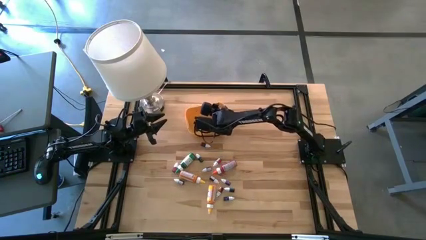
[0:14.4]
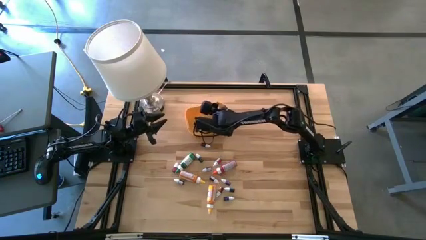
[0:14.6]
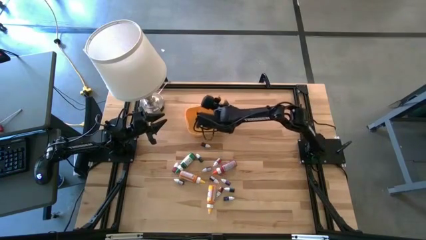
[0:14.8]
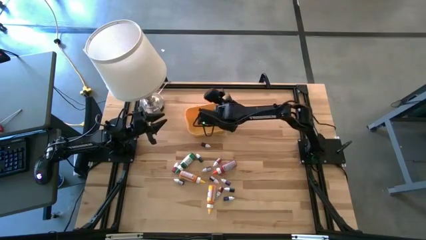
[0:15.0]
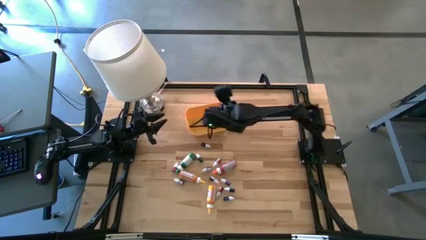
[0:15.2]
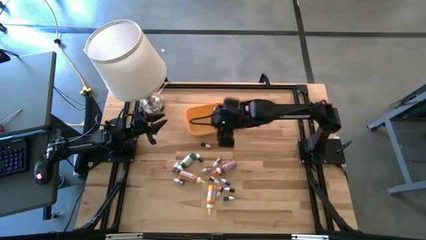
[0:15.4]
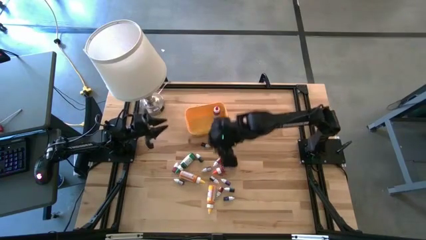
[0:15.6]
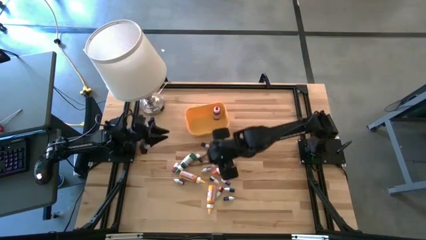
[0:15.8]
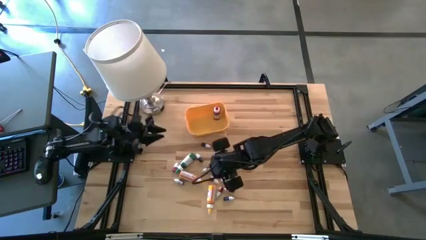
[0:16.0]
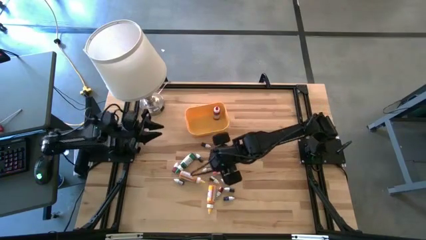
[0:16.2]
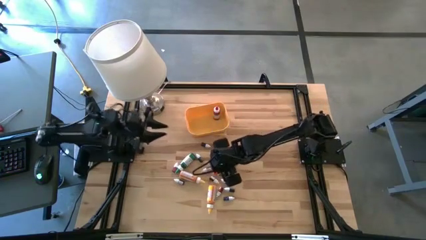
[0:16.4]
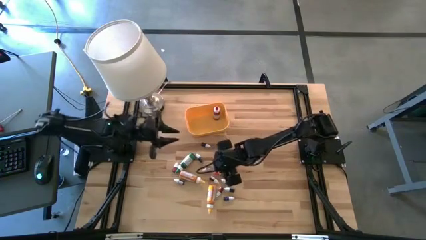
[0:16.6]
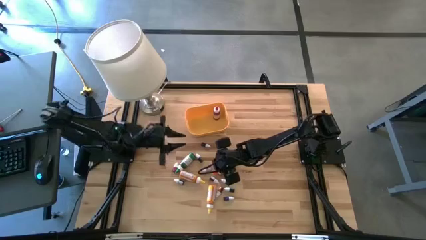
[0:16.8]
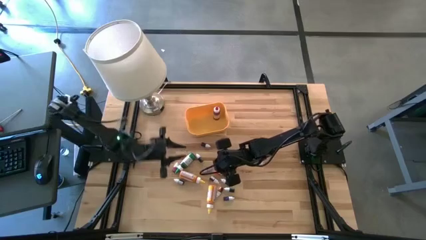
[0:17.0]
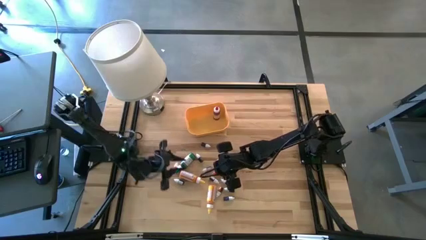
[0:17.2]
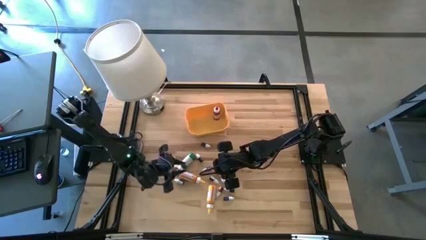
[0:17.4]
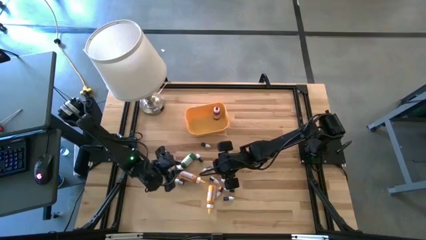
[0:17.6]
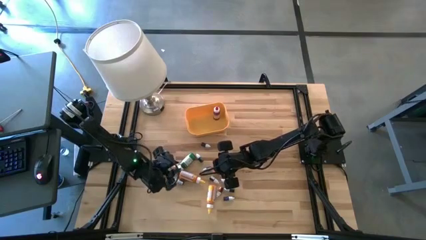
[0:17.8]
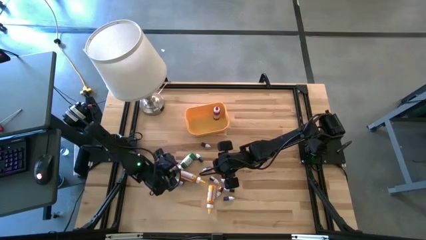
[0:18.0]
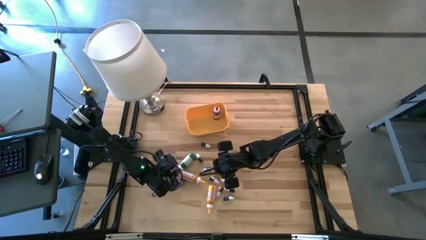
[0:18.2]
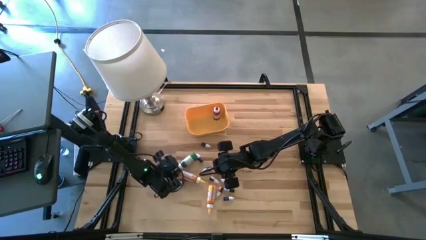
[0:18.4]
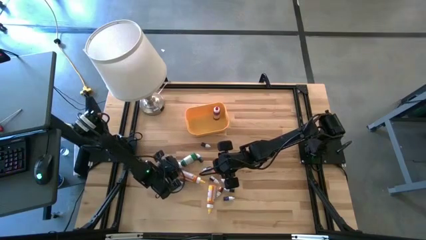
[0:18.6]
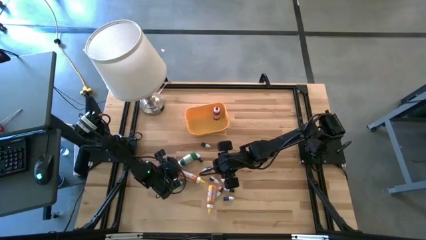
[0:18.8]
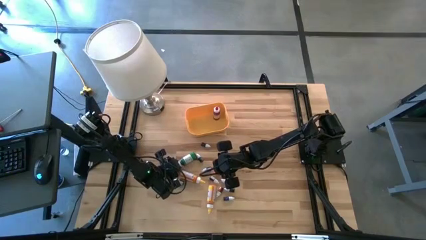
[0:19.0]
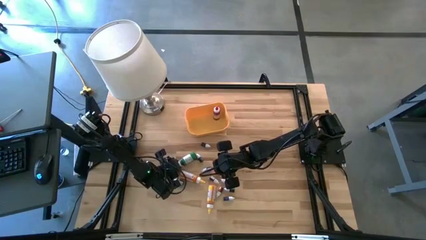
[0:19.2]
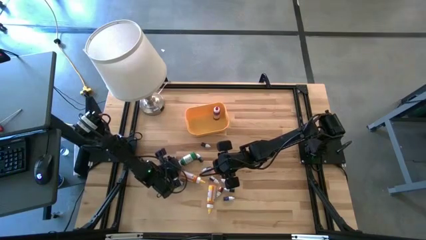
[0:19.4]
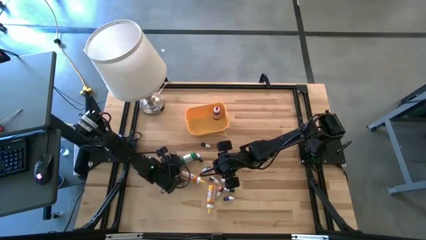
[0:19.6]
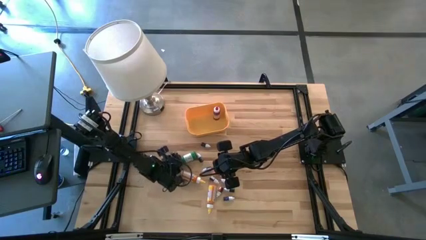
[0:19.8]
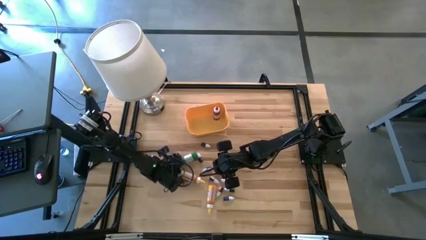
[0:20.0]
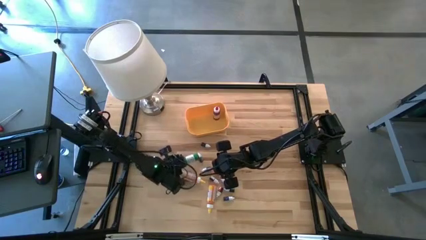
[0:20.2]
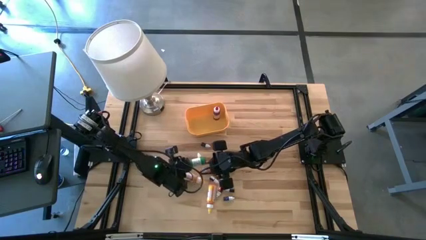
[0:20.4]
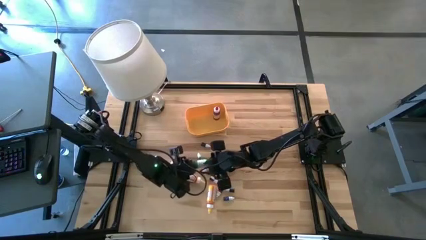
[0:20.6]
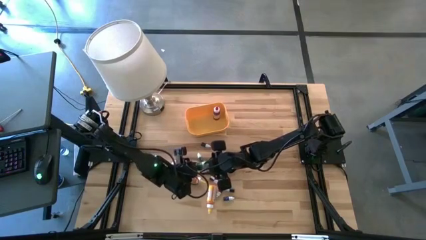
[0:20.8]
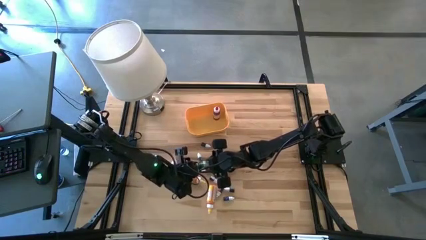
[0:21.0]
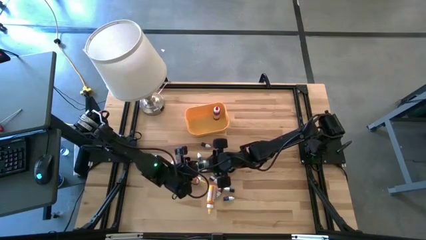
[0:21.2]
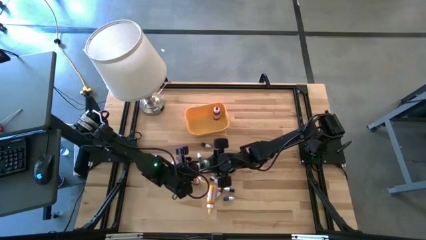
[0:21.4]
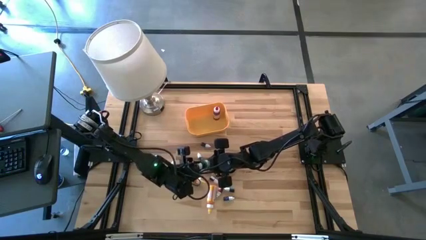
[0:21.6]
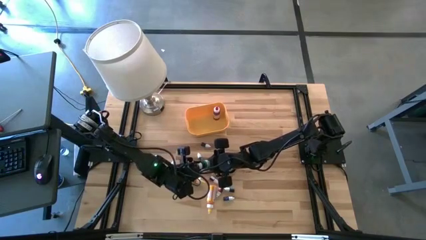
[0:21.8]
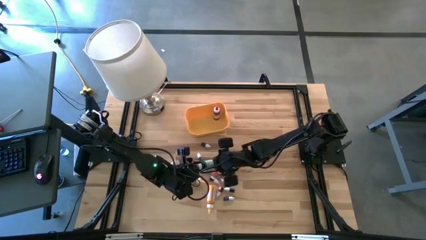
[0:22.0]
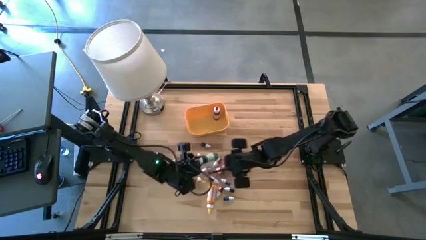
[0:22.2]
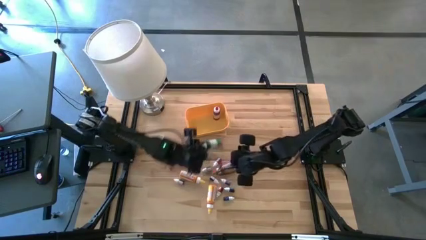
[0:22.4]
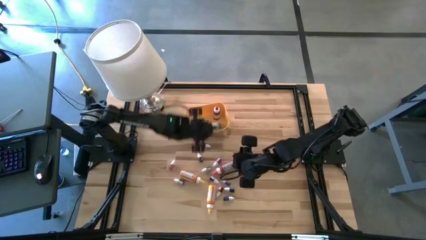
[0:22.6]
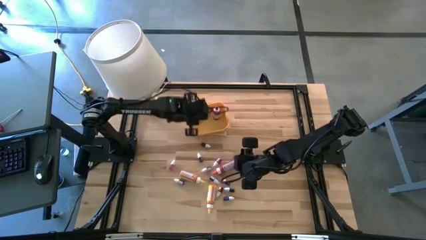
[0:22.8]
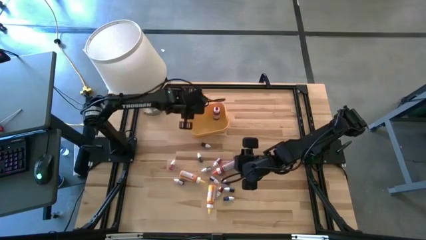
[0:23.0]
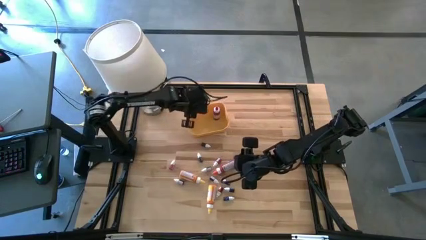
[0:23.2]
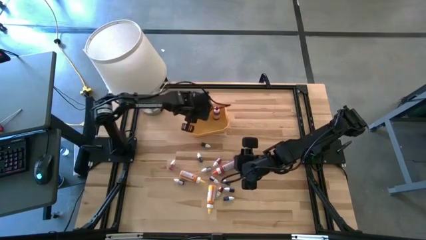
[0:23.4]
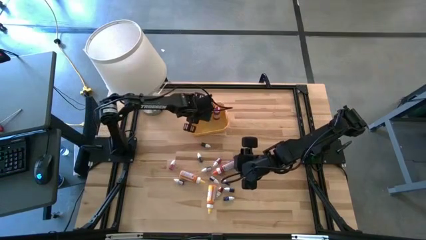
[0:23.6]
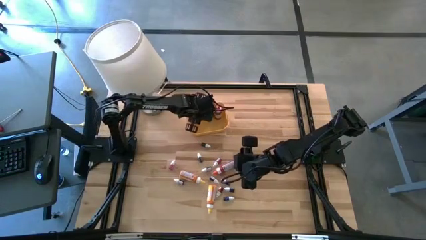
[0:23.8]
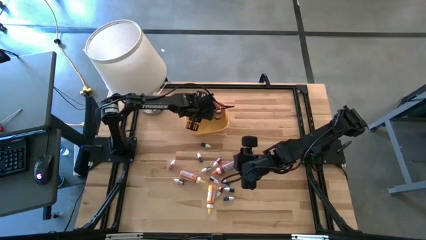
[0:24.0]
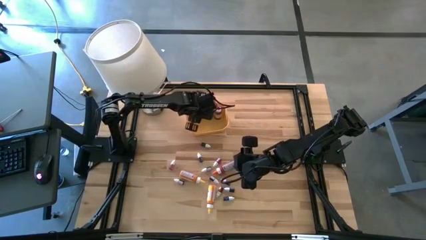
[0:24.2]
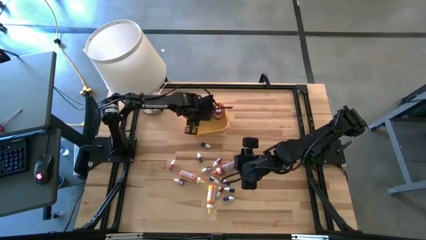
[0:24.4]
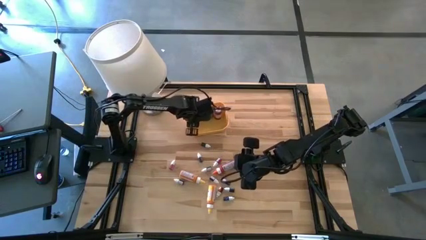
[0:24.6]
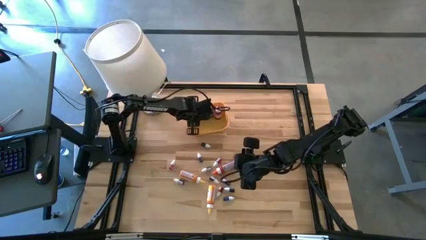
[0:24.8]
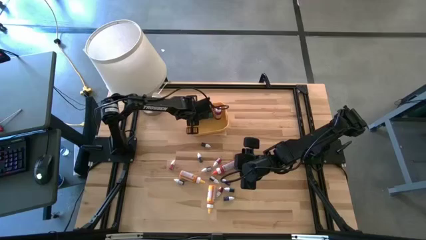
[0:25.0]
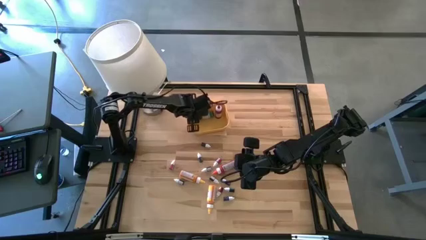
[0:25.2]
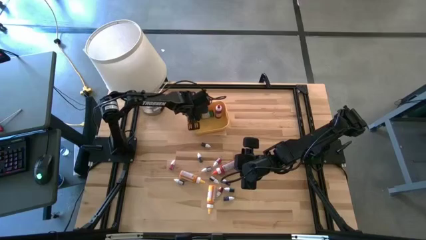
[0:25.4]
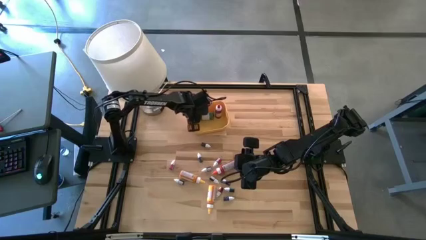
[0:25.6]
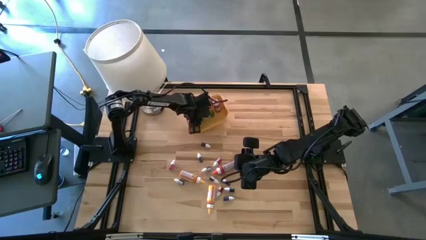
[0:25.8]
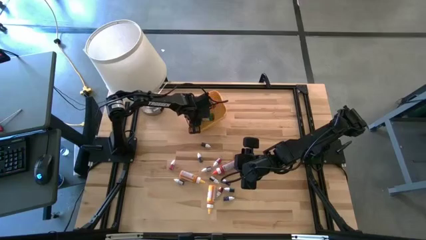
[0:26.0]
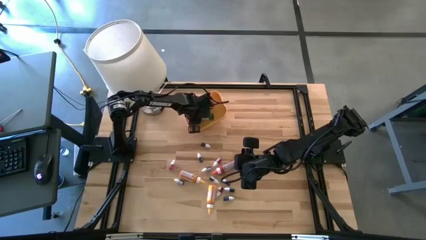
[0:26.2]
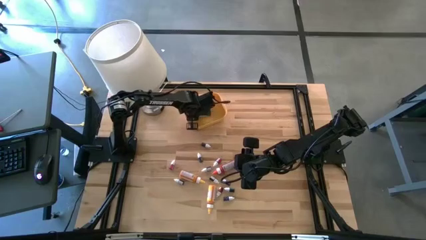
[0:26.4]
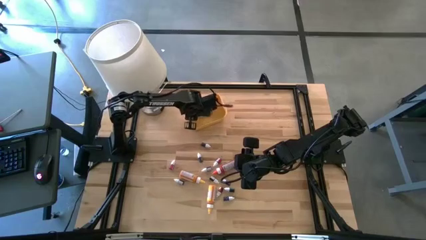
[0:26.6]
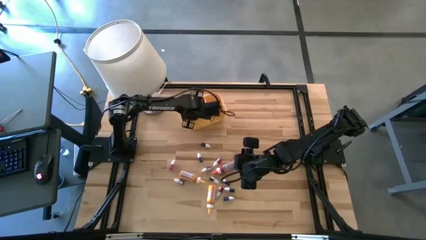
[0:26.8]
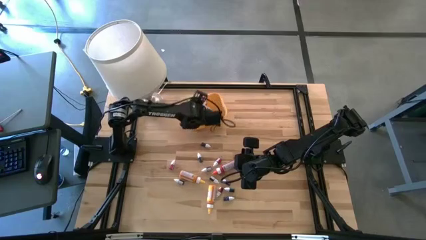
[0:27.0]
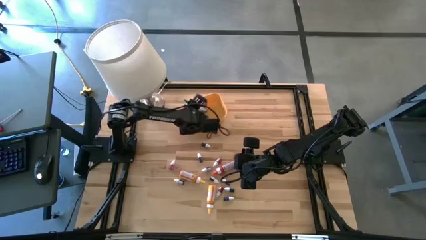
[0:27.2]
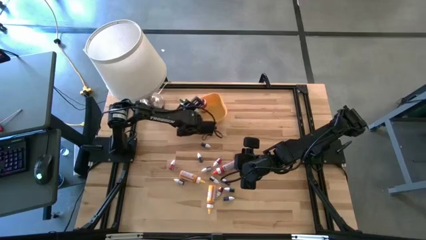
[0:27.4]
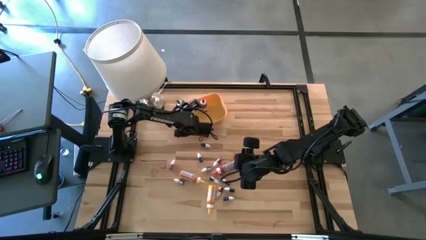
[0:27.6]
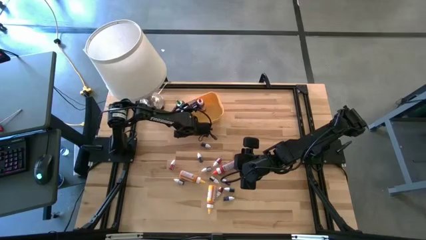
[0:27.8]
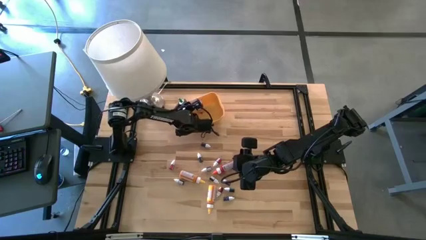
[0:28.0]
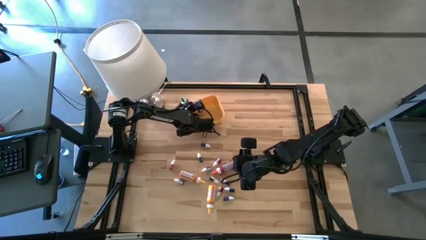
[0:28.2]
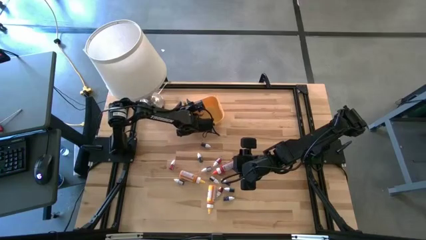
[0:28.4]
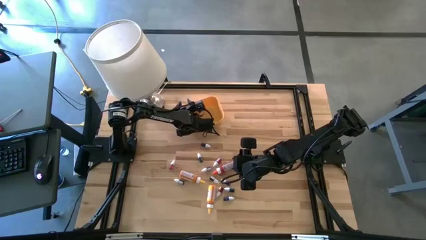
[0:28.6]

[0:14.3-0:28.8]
Task: Pick & Place food coloring
Put the large green food coloring bottle into the bin
